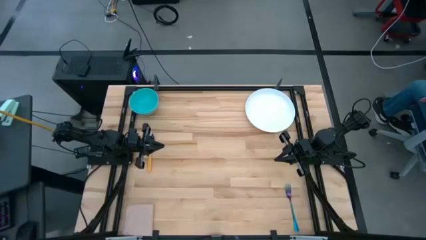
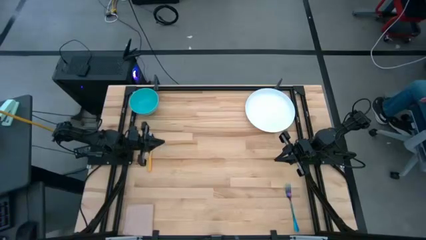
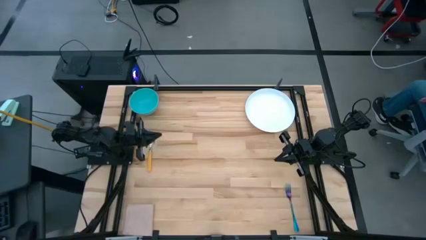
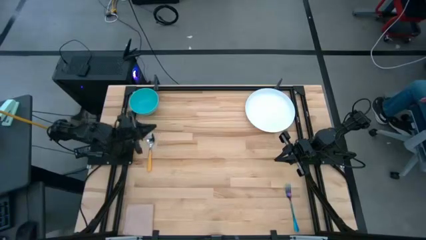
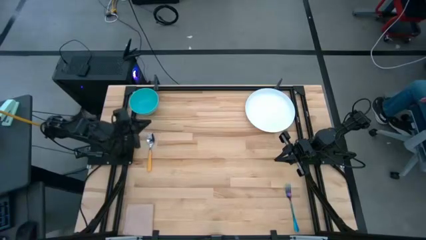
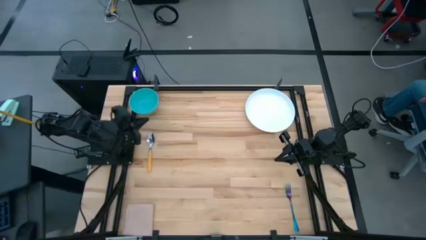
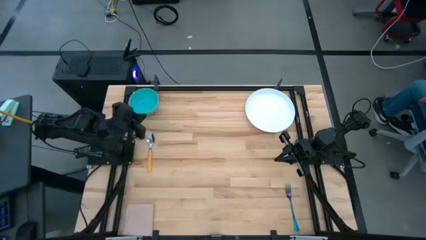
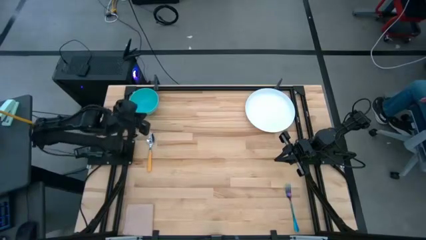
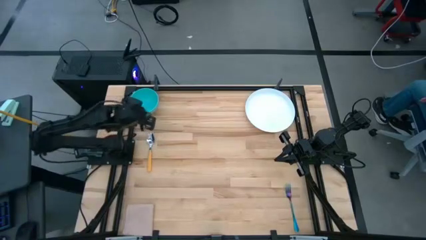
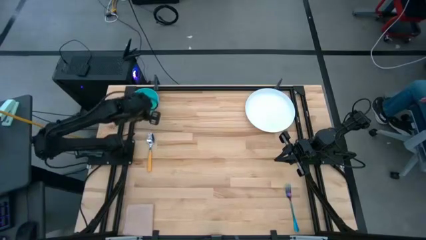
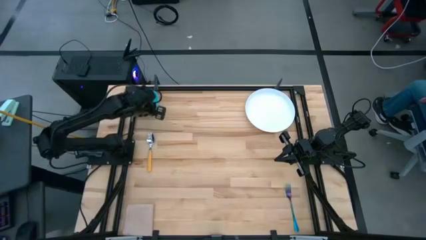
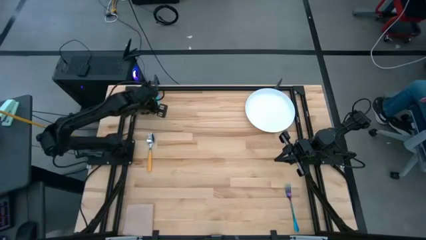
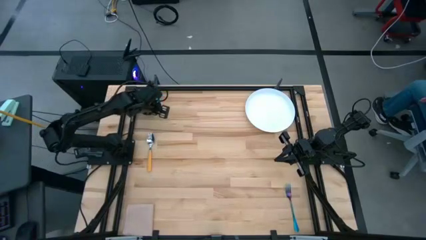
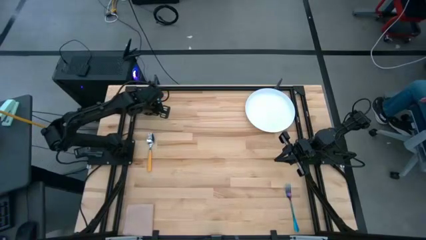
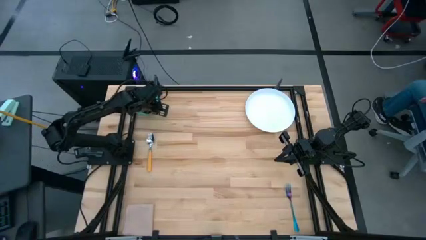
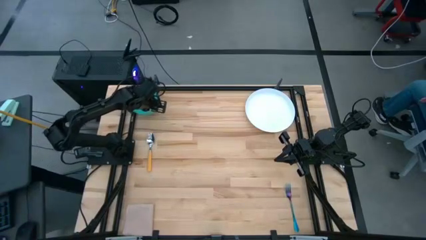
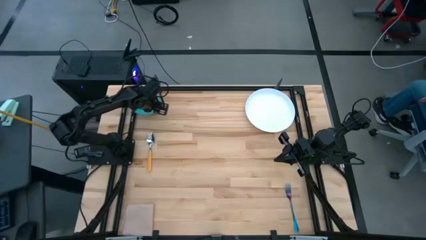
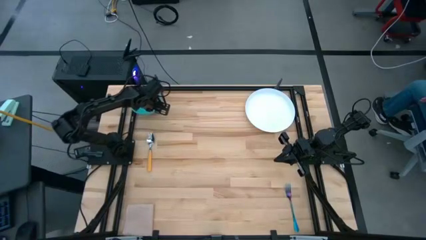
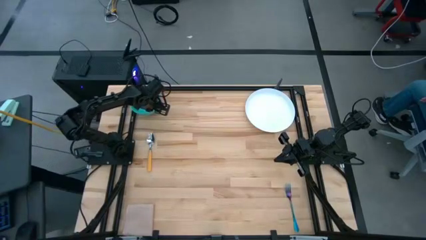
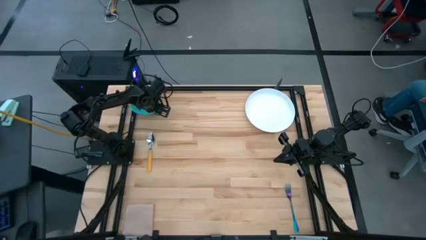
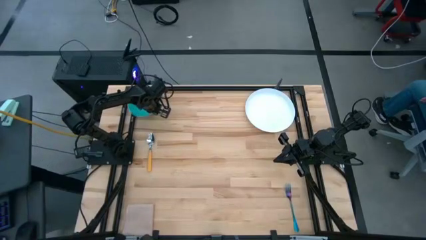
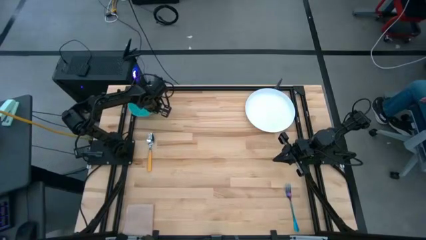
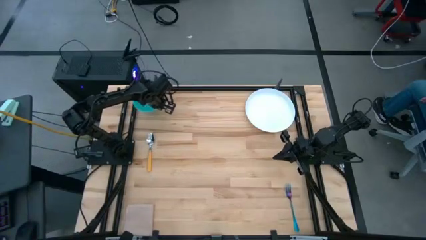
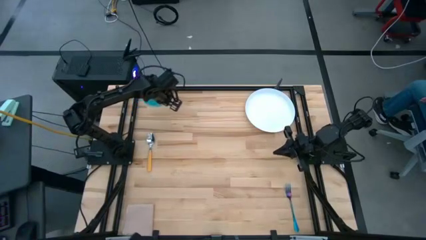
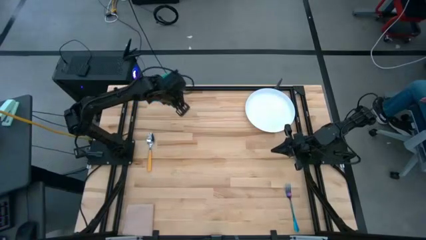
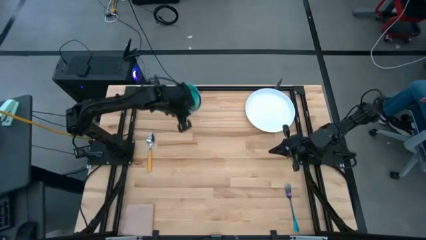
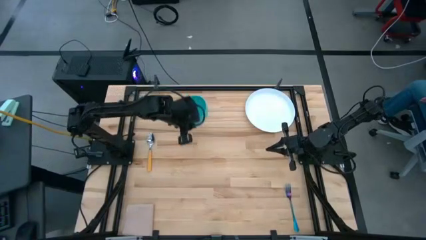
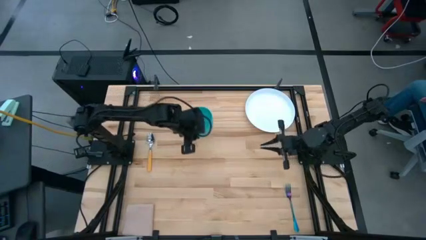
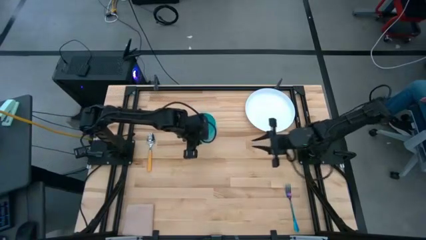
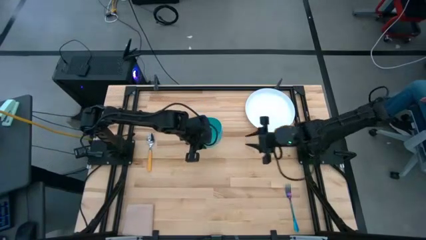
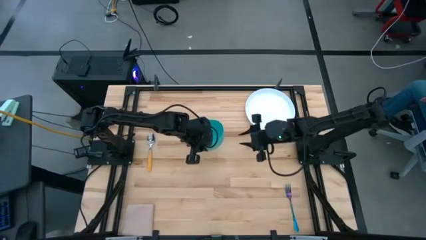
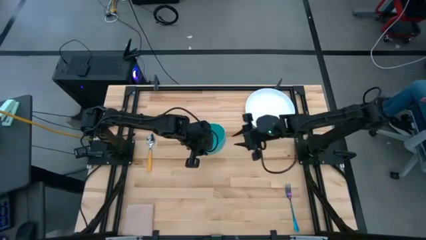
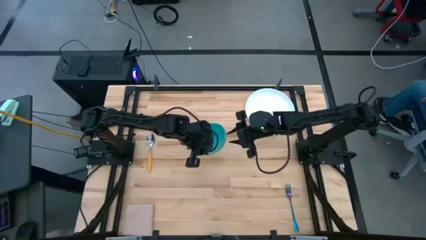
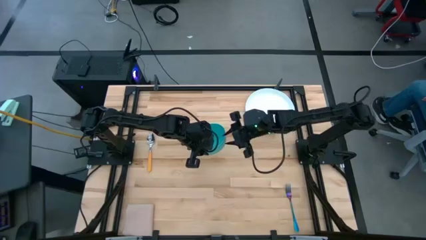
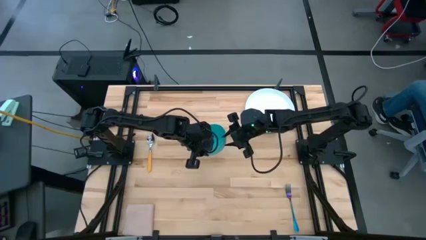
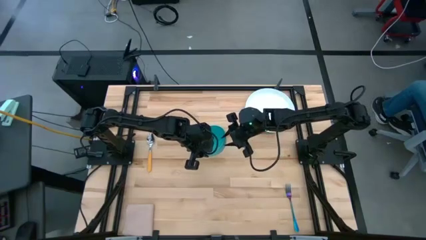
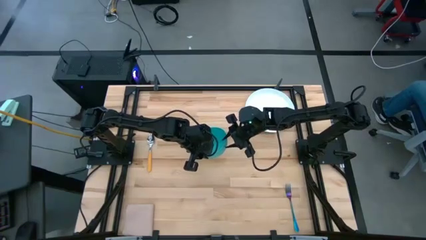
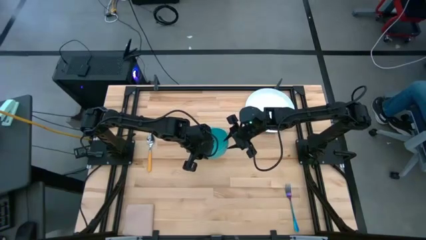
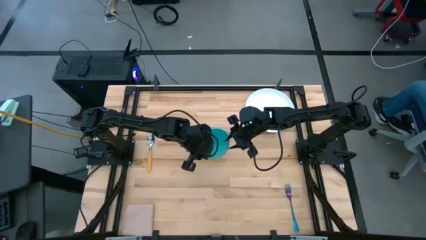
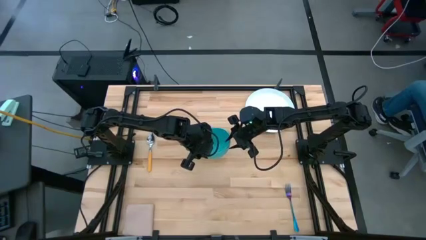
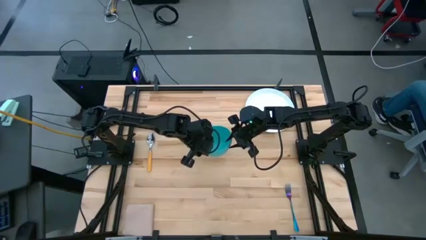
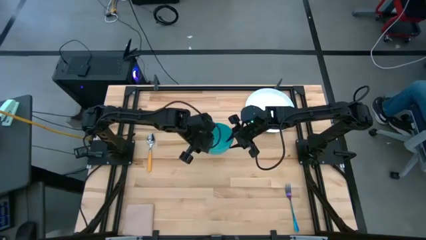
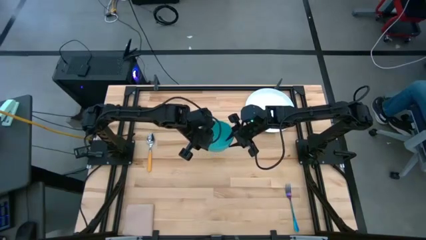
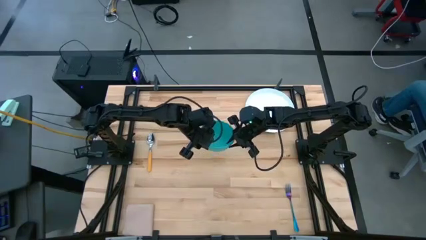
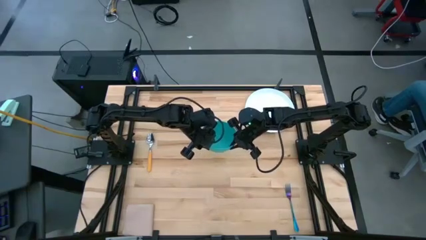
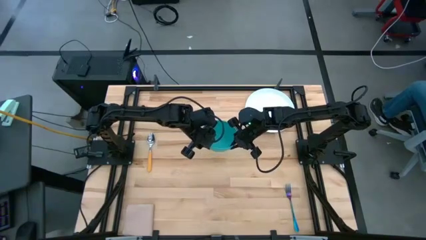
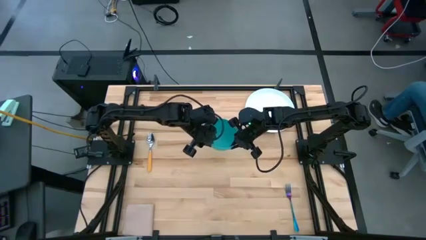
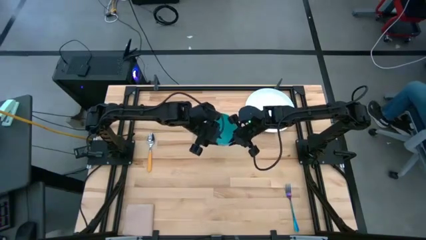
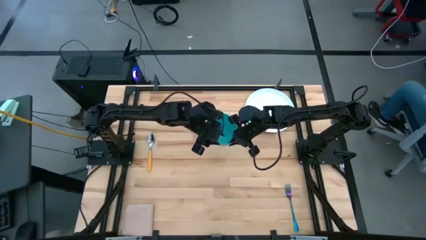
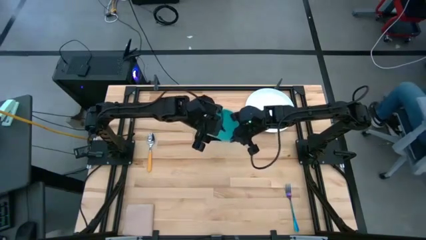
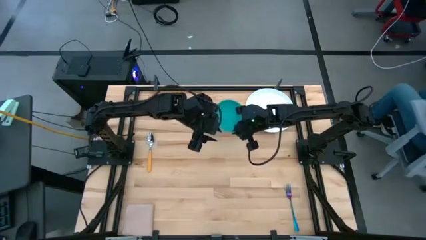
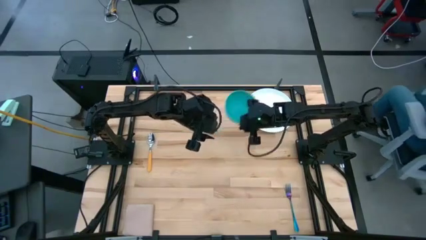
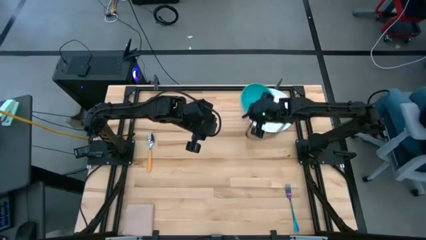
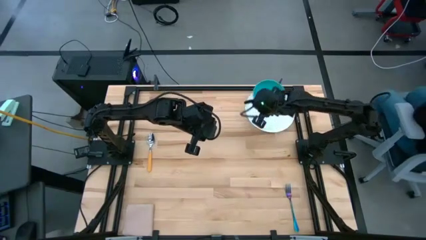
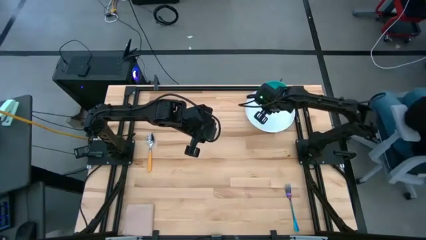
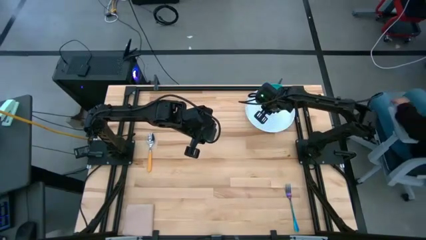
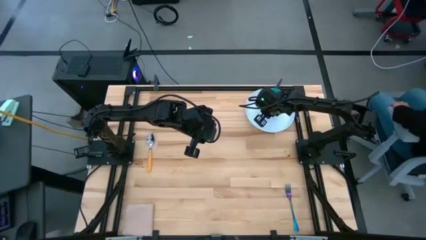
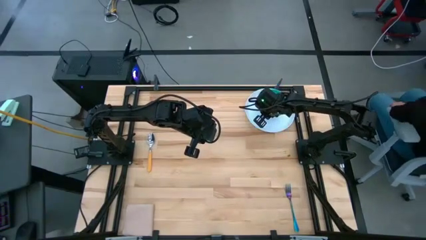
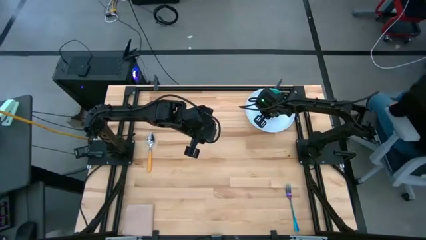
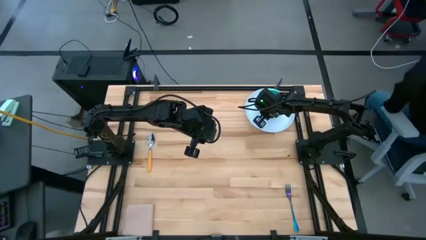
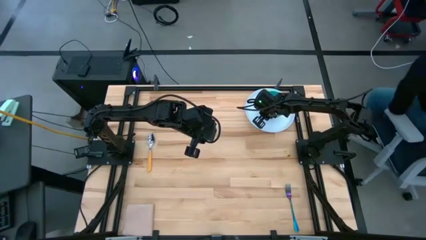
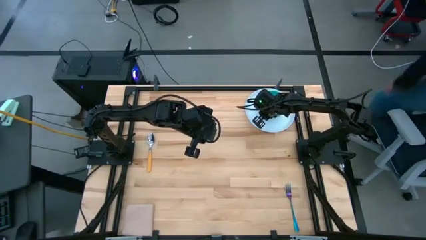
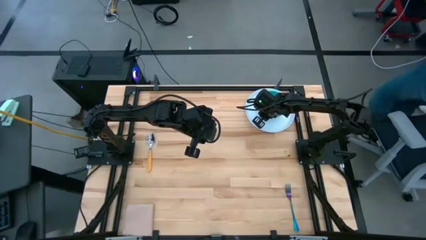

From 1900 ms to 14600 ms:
Task: Set table place
Put the green bowl on the blue plate
